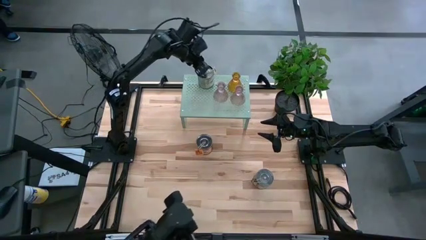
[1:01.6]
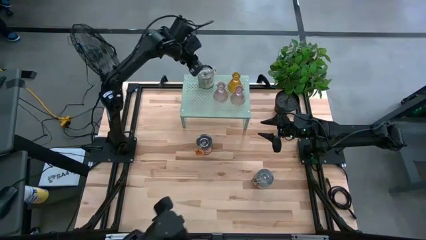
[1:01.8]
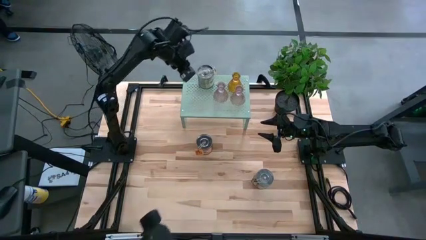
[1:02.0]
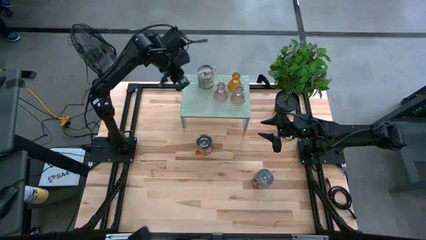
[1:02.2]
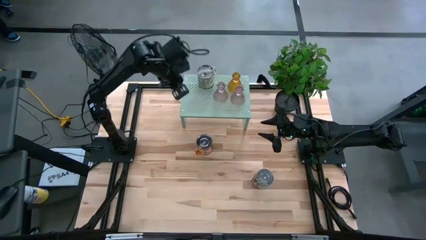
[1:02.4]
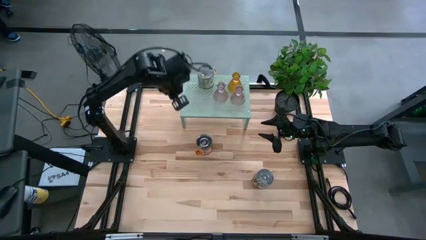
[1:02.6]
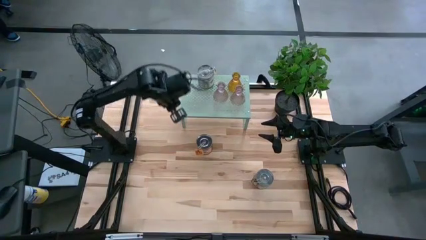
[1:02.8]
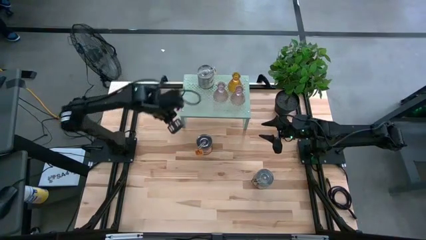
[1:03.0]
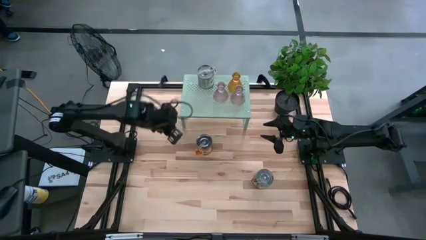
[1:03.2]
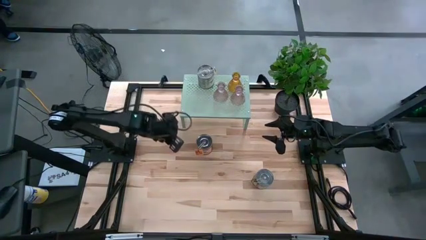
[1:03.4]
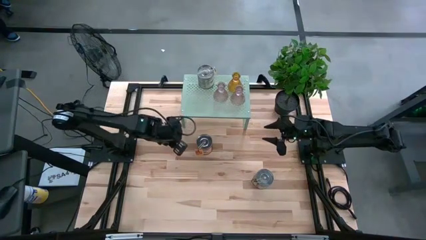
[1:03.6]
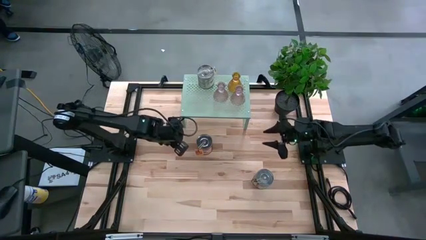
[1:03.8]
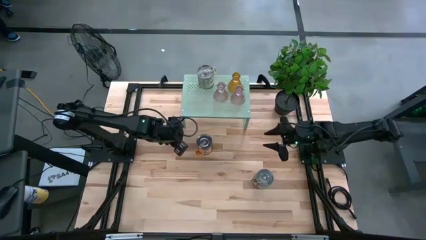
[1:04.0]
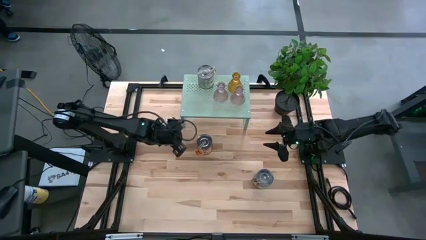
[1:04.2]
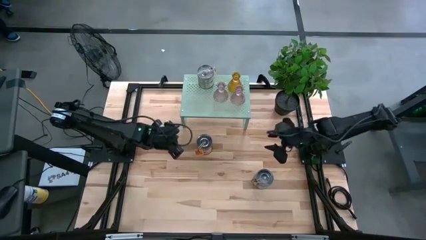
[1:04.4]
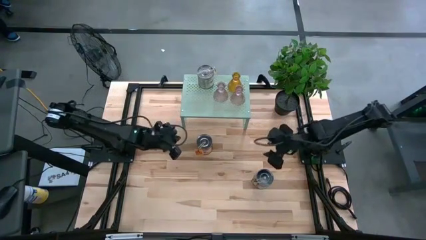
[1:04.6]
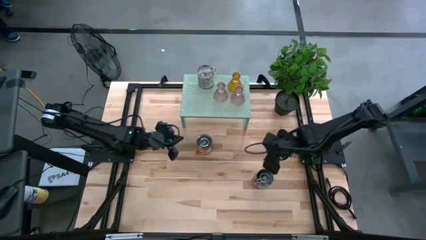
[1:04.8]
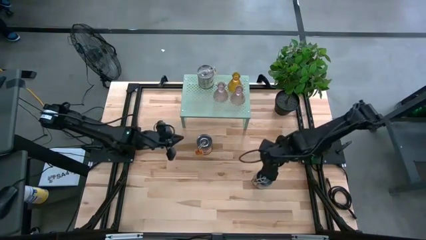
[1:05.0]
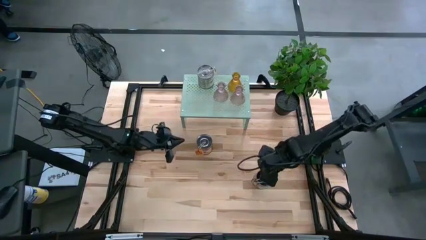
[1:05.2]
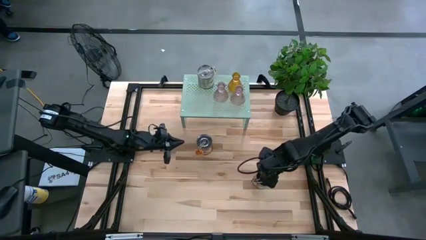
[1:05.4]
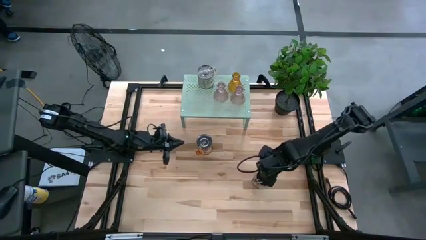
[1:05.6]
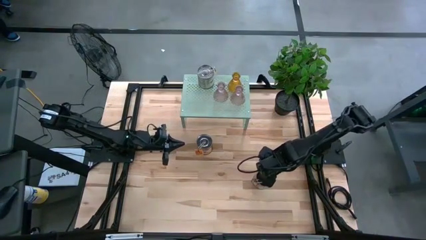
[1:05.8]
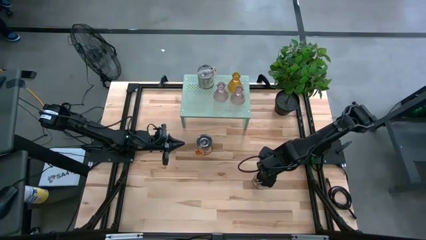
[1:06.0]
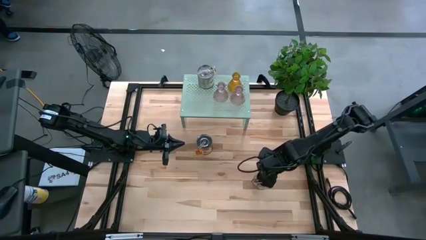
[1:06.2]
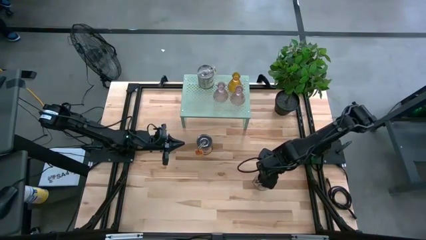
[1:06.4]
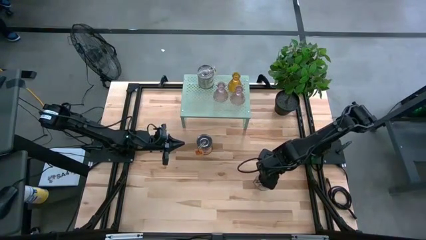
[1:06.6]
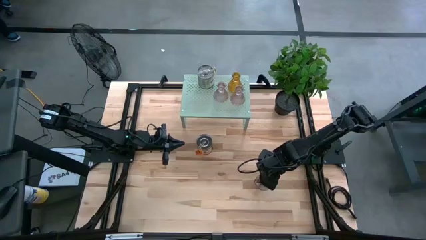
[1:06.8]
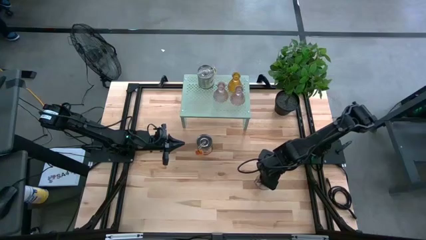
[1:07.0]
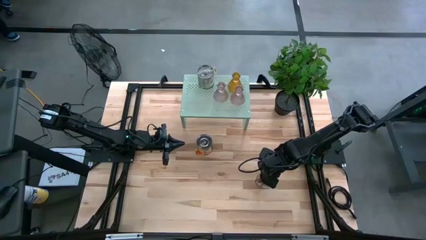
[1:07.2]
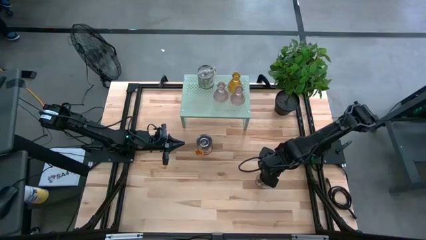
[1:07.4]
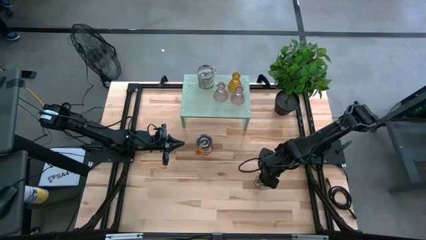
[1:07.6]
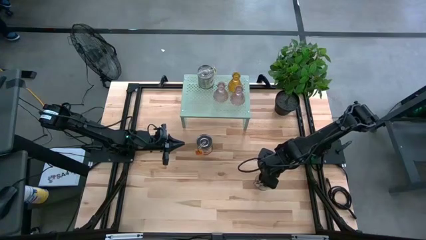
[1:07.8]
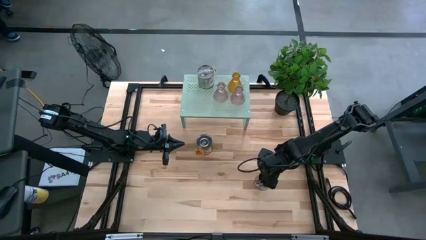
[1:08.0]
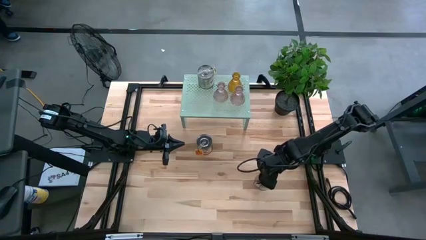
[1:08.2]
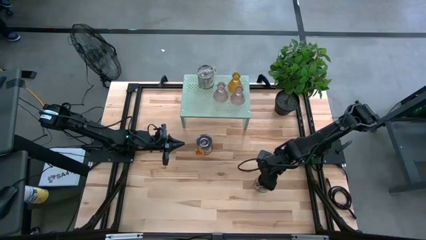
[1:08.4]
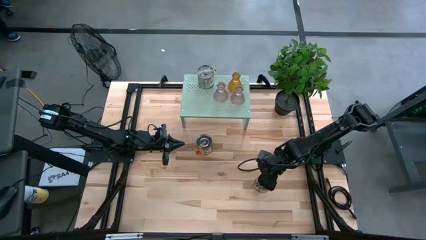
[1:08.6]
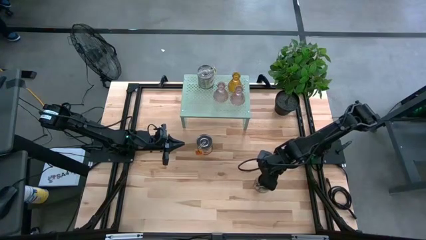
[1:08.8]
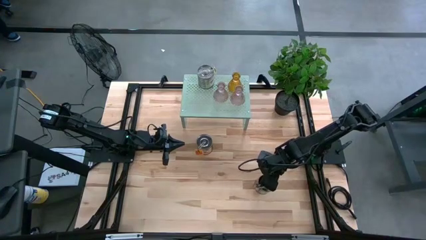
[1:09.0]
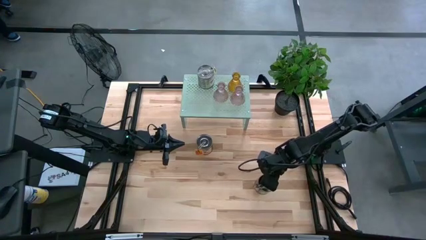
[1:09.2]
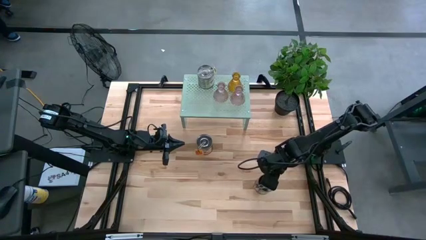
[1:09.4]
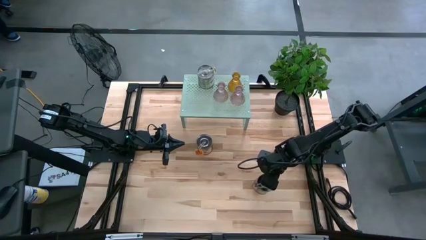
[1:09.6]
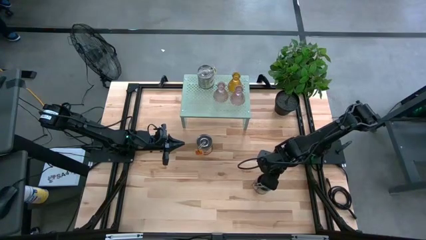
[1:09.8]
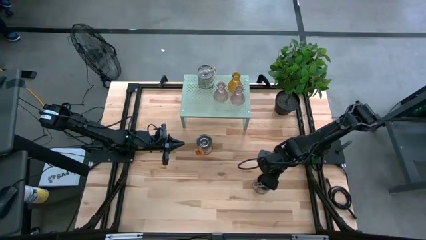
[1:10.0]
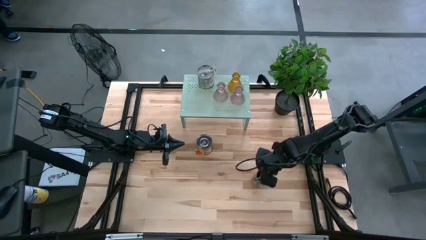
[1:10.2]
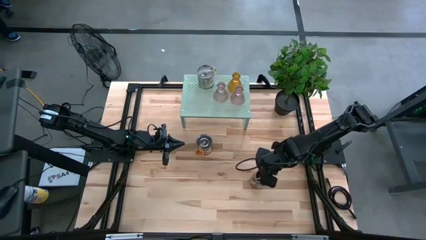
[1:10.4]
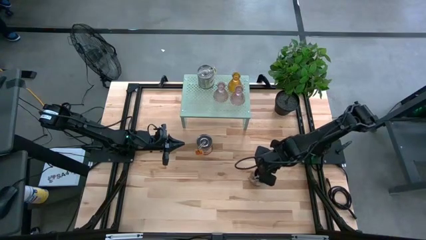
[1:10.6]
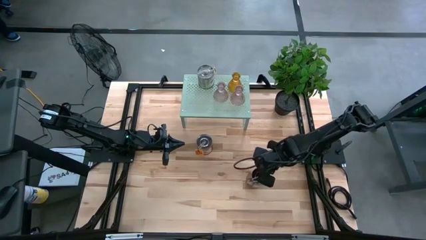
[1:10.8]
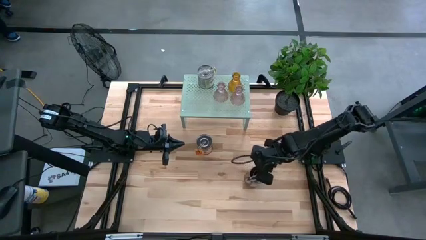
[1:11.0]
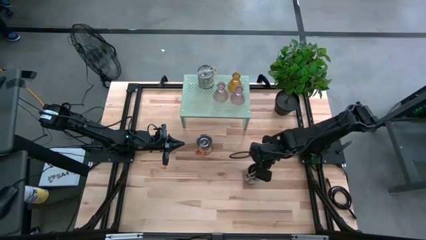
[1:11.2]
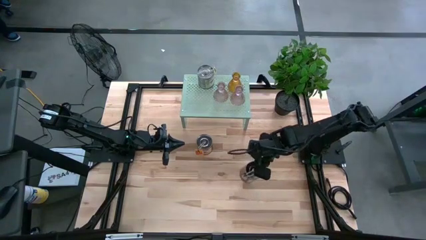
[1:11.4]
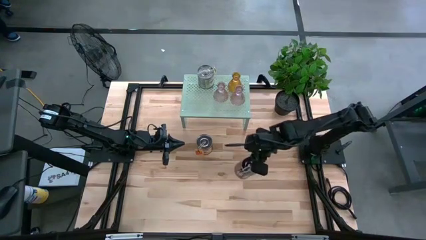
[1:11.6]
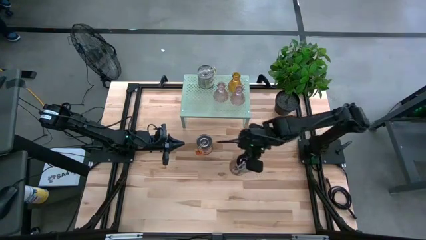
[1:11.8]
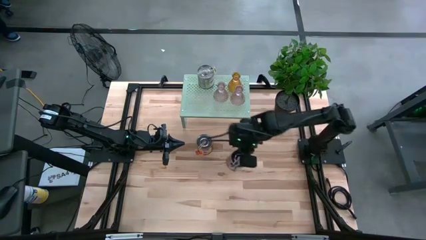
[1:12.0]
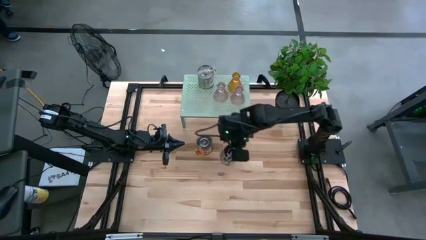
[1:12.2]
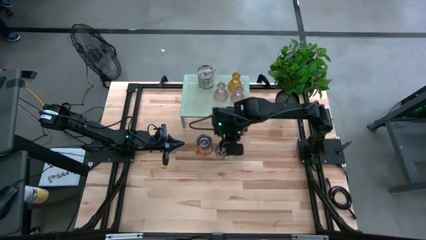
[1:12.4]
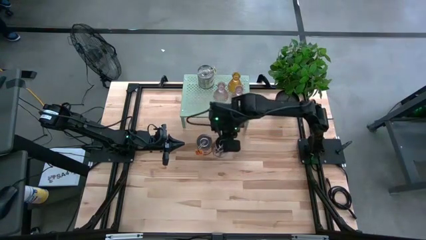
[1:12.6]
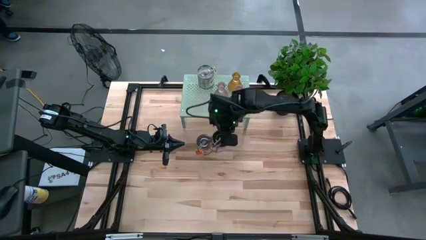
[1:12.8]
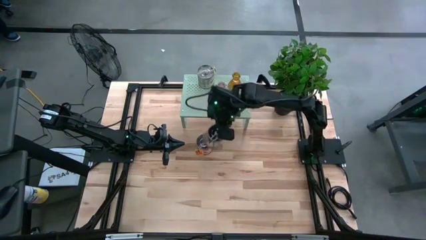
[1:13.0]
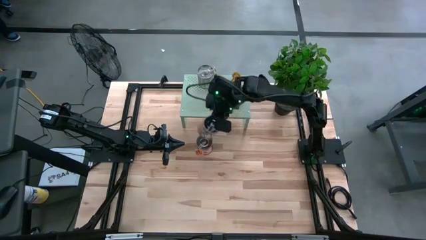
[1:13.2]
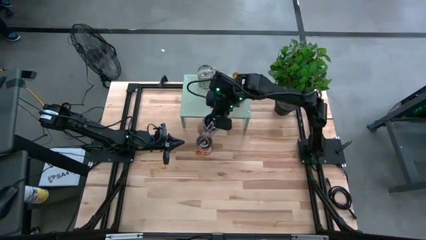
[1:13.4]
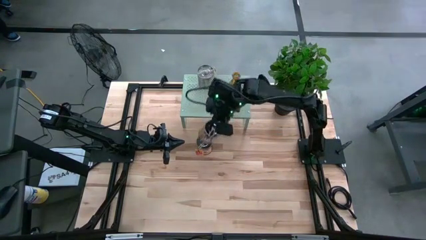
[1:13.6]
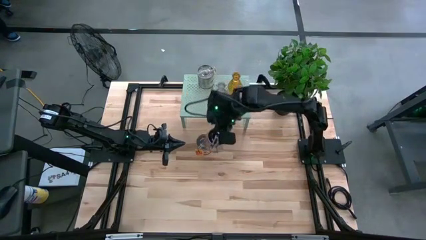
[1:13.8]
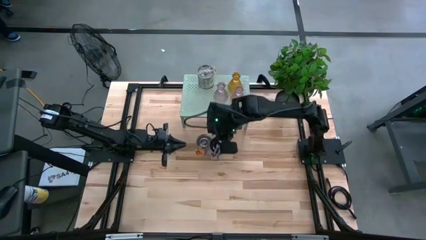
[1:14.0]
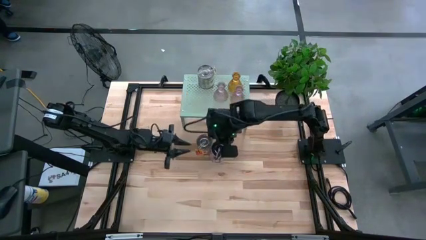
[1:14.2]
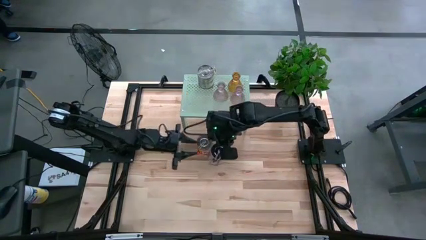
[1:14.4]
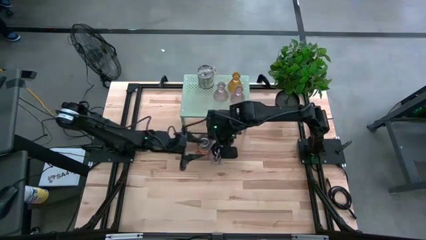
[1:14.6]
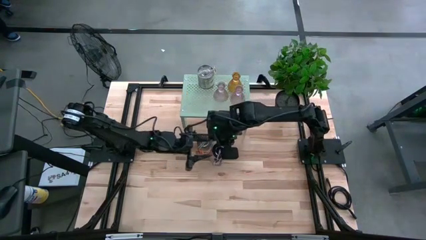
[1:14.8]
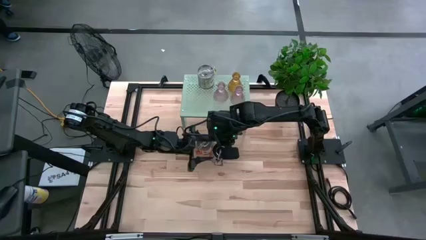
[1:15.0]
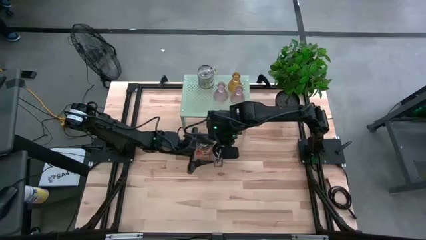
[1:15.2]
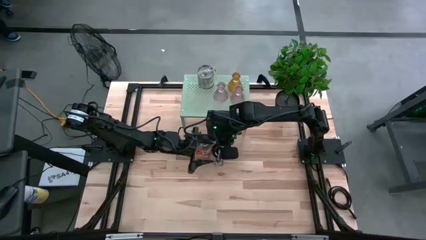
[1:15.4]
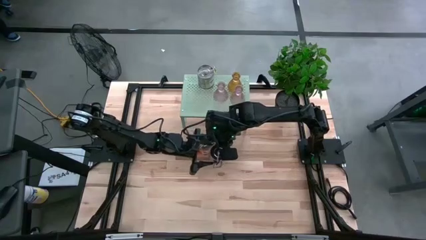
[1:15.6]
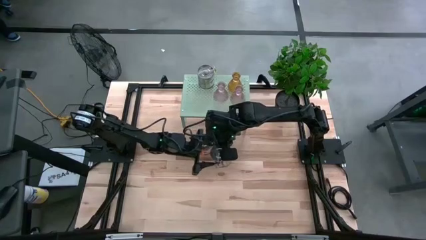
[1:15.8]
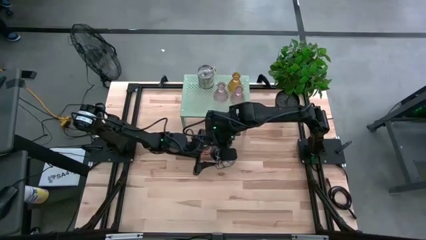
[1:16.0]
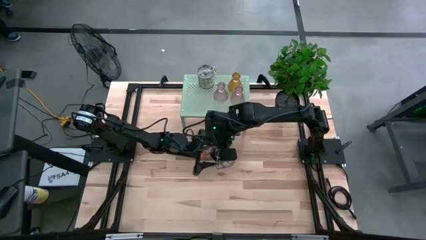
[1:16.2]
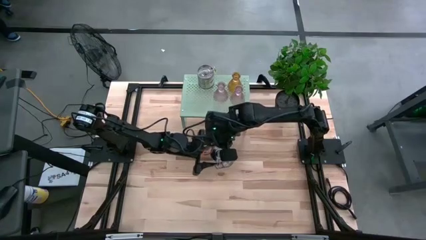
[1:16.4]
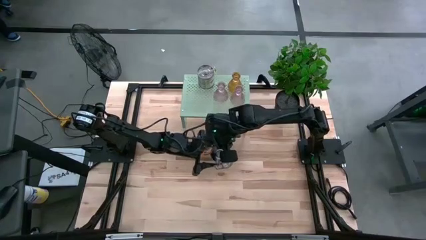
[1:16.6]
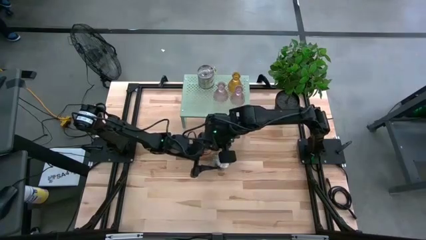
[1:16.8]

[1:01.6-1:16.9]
Task: Pick & Place candle stick holders
Put the brown scented candle on the shelf
